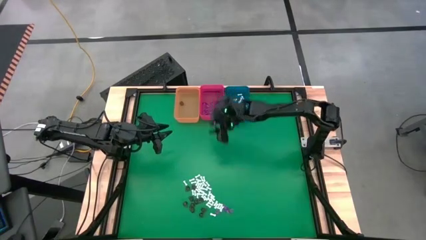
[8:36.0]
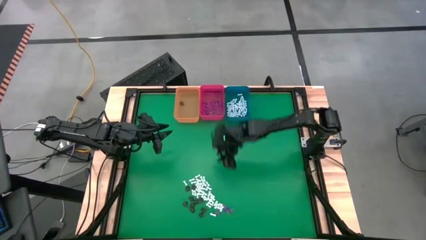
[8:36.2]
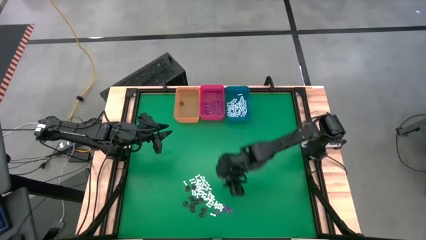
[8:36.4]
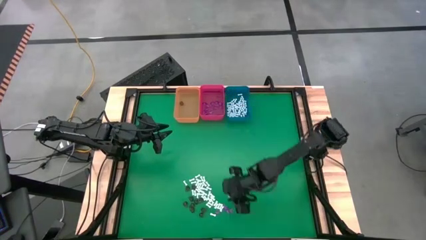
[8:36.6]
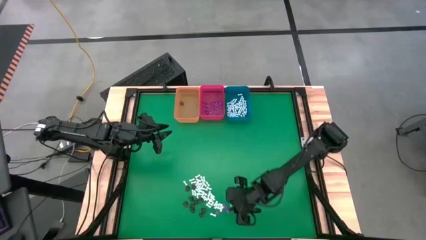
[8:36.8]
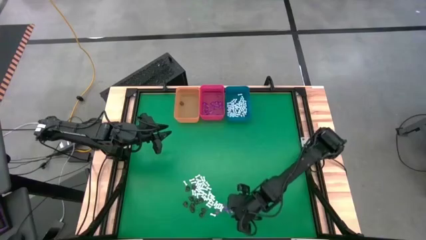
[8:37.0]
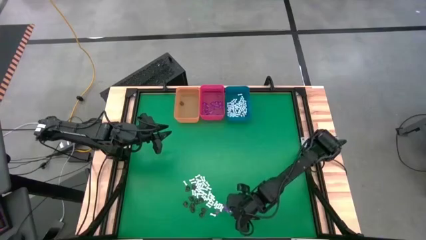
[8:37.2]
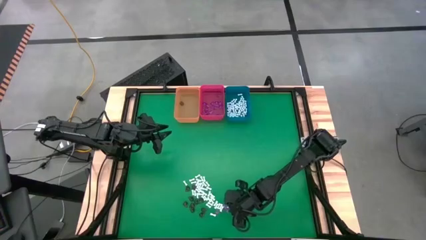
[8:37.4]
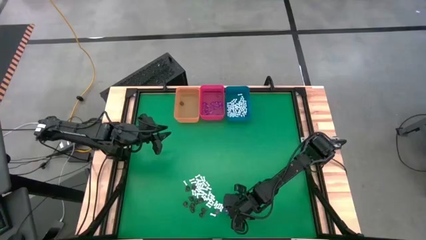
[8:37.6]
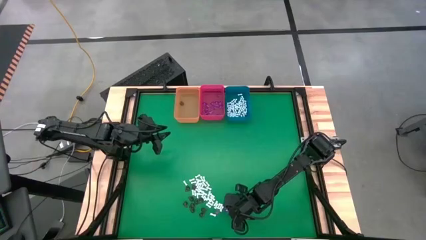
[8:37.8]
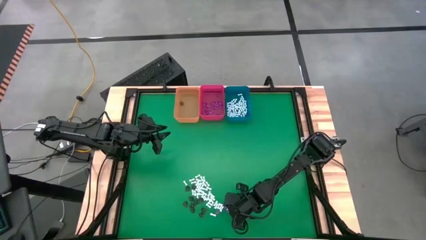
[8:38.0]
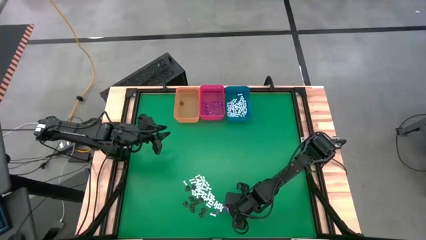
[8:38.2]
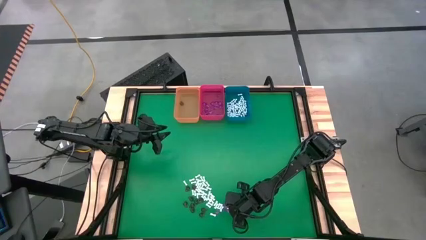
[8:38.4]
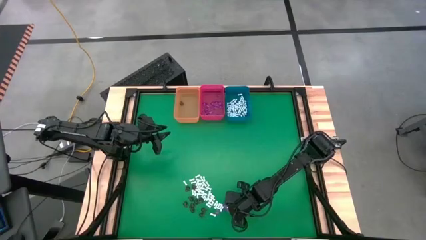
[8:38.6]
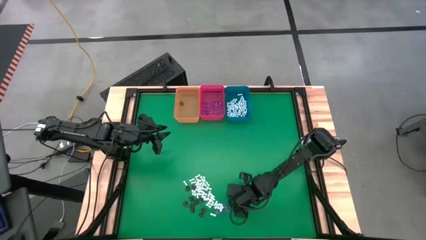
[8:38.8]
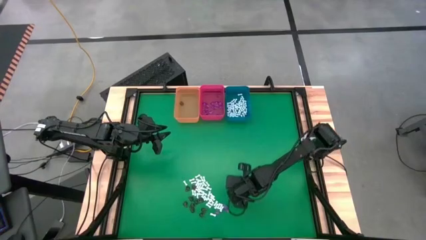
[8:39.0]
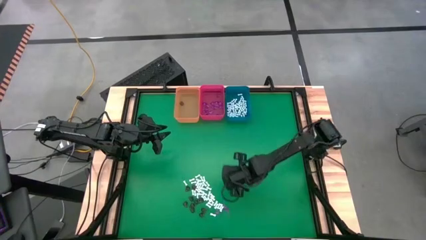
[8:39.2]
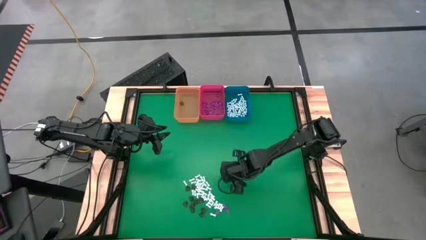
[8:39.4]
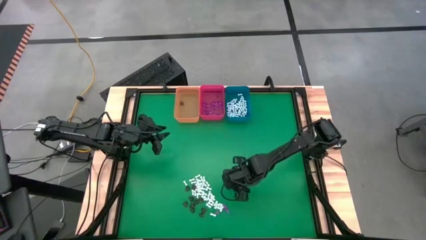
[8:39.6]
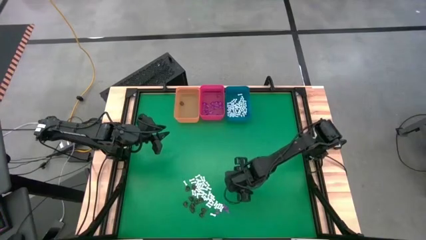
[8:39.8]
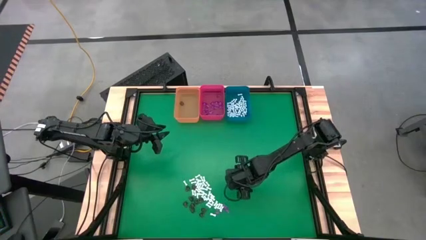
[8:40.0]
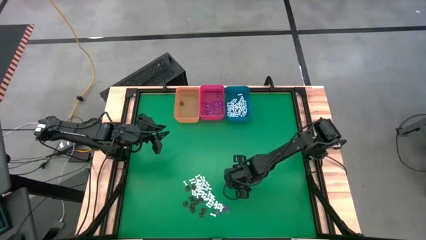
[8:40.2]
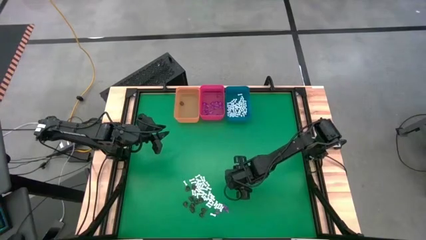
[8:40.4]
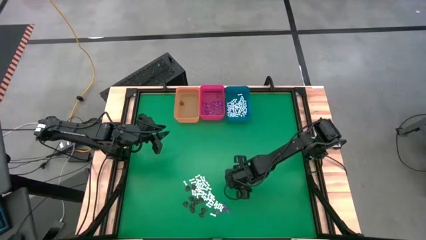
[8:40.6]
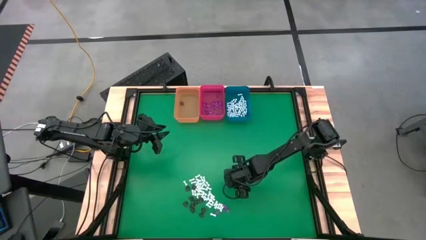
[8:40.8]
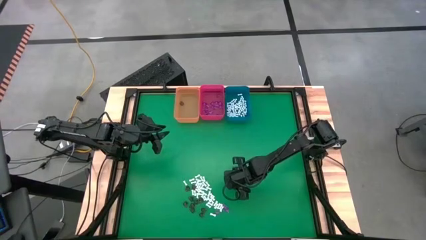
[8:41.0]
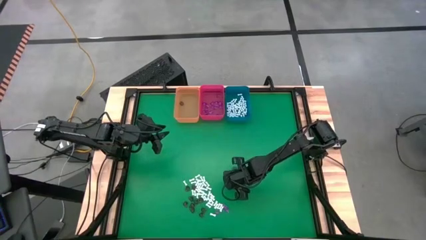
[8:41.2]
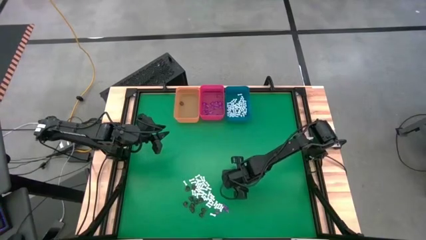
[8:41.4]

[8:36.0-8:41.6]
Task: Sort Halloween decoration
Put the violet witch hat toy into the red bin

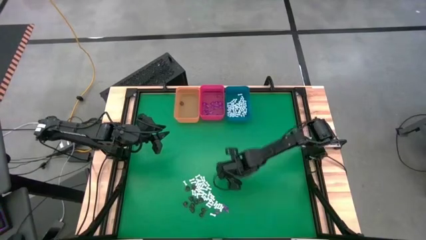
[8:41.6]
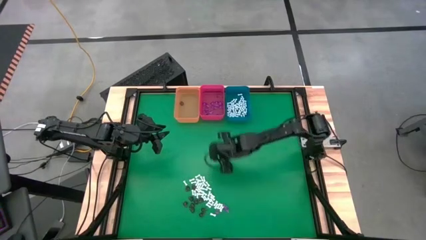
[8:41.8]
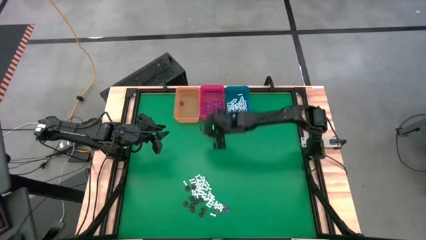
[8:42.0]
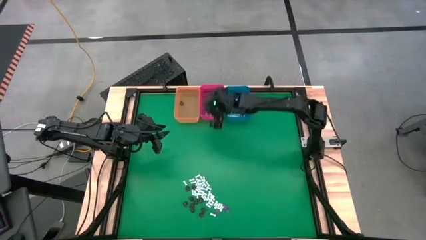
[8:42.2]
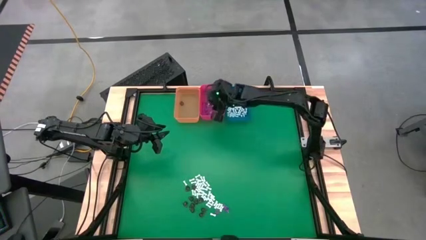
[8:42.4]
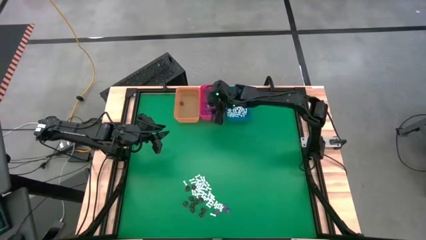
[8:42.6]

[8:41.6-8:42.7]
Put the violet witch hat toy into the red bin

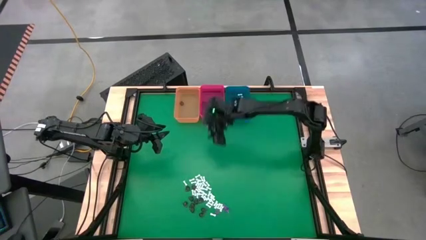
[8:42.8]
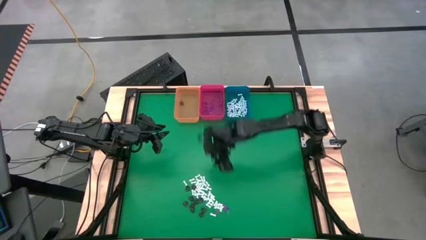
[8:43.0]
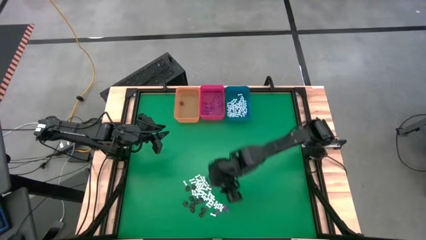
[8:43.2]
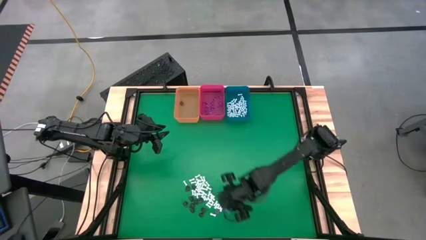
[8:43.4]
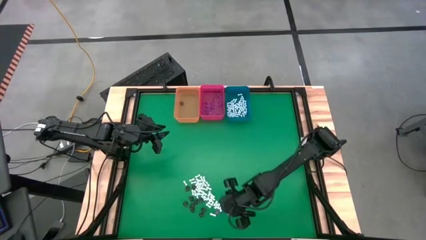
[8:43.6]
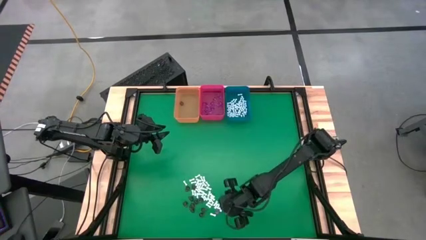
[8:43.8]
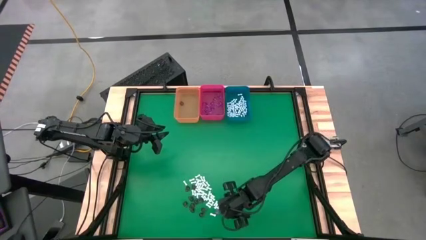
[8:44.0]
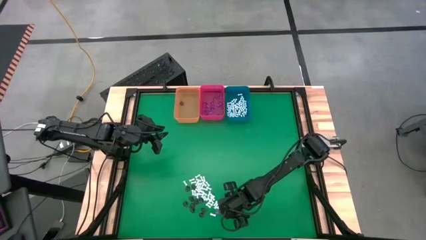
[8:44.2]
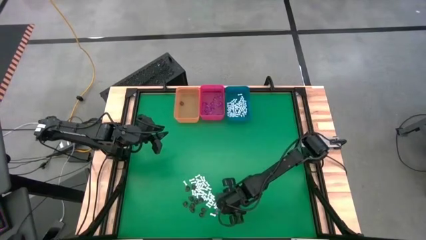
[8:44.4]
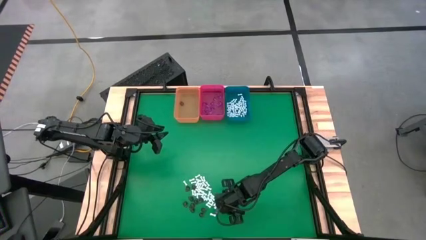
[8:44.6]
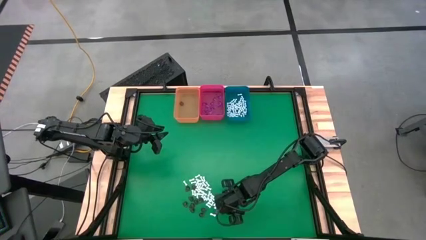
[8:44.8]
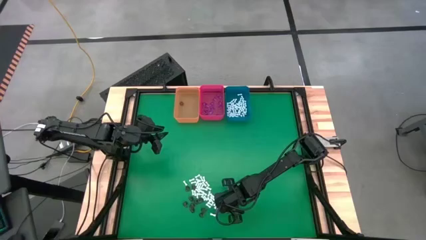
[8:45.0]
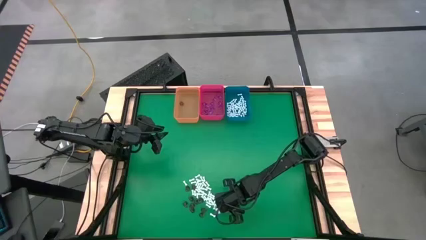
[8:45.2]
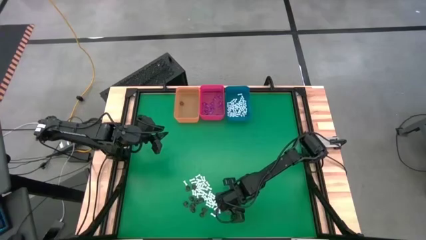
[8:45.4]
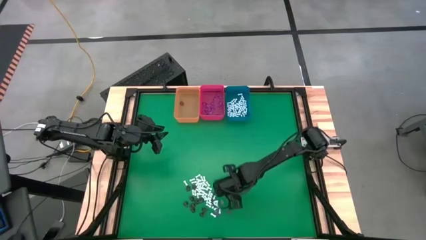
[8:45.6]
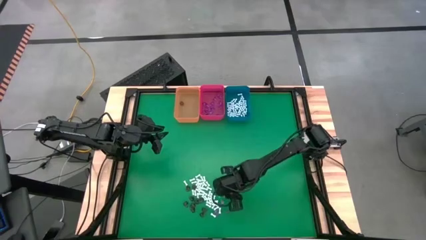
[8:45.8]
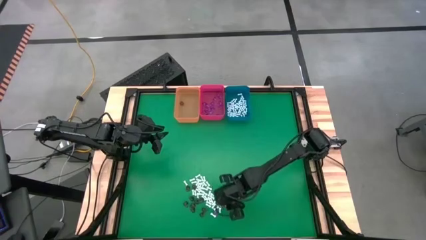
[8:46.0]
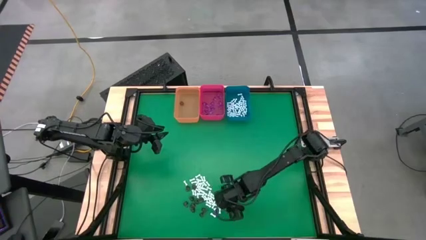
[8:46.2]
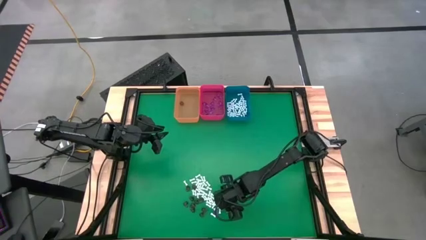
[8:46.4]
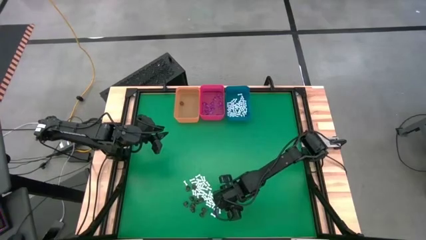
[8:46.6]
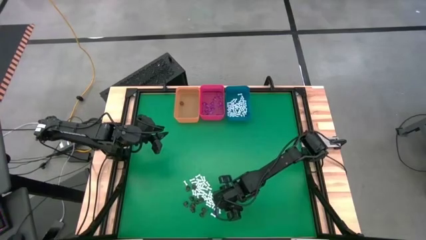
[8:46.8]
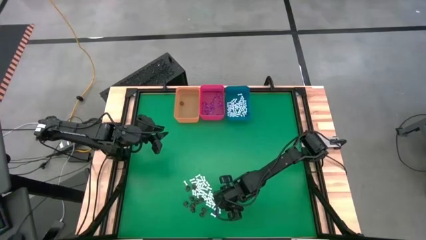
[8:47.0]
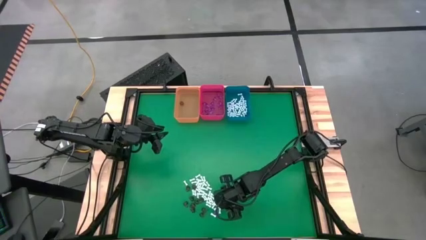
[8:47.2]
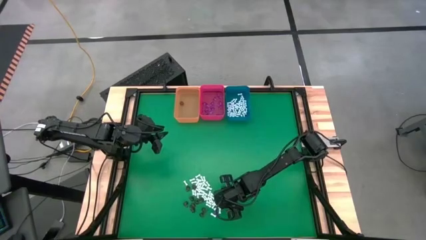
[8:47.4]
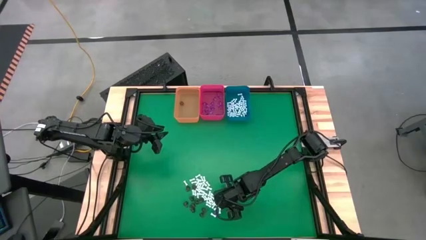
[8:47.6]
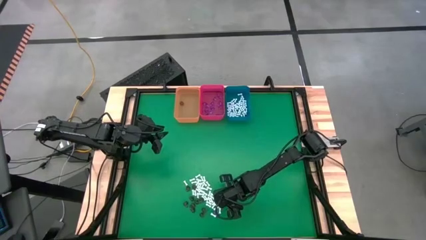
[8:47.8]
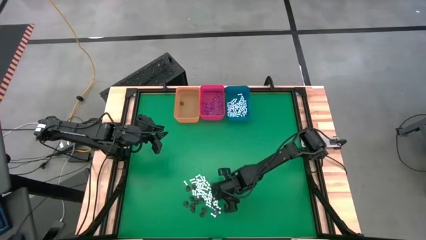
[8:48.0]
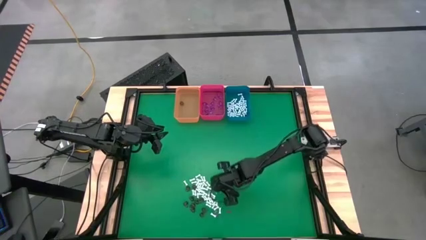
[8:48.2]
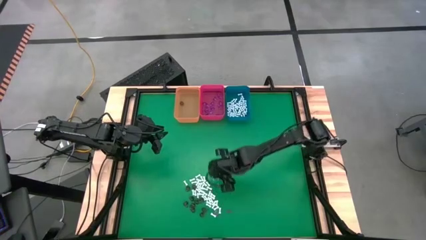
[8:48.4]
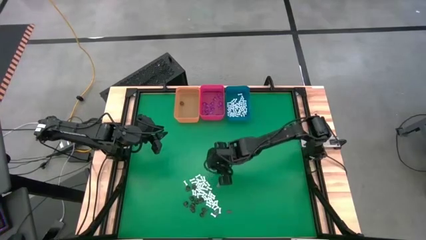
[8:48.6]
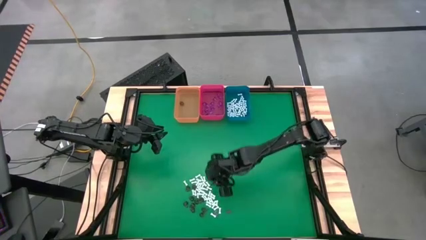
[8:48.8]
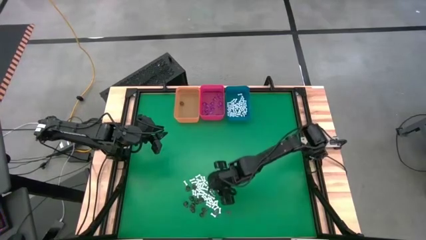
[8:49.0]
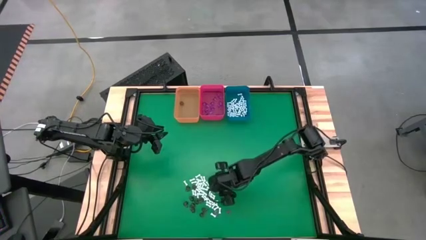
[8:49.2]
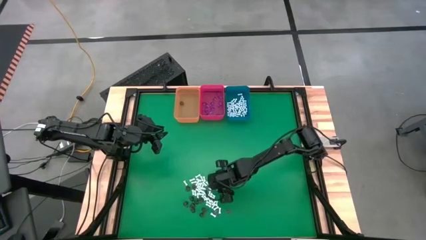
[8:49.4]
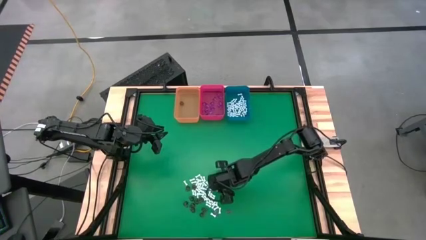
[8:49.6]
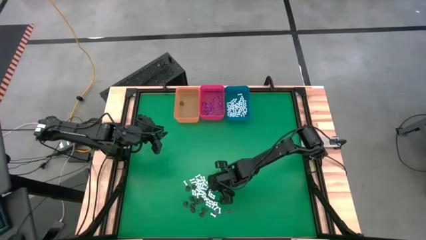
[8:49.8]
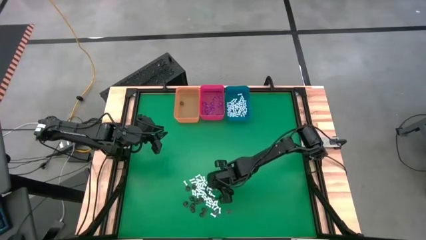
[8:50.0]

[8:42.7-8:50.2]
Put the violet witch hat toy into the red bin

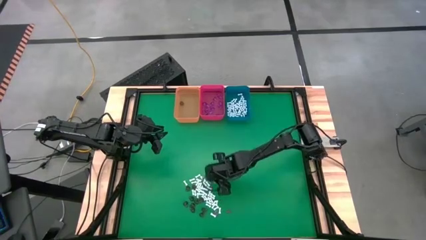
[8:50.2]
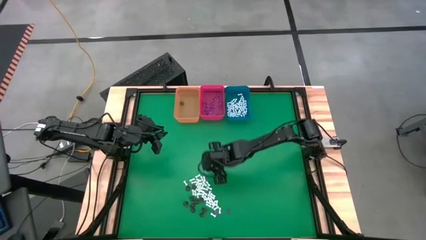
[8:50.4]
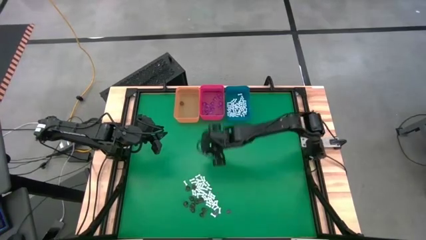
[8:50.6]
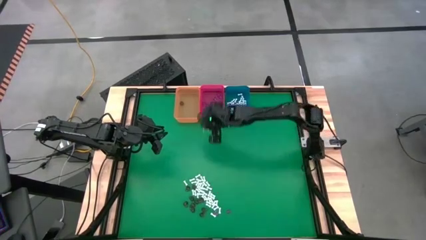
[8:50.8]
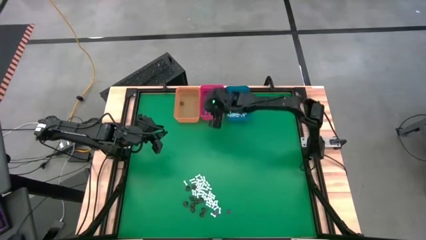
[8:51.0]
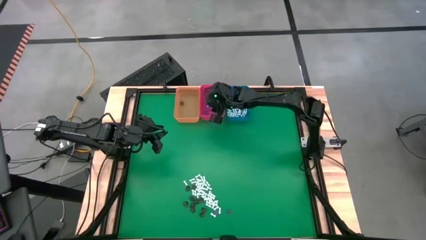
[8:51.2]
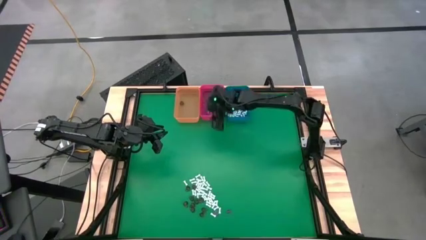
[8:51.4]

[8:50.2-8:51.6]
Put the violet witch hat toy into the red bin

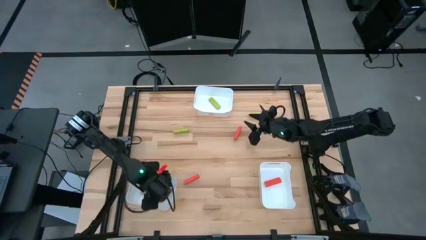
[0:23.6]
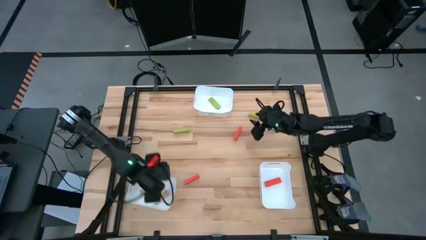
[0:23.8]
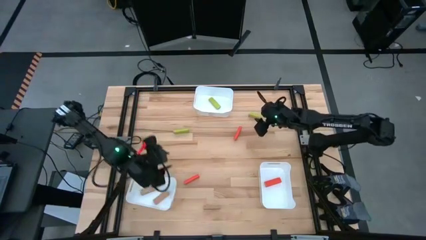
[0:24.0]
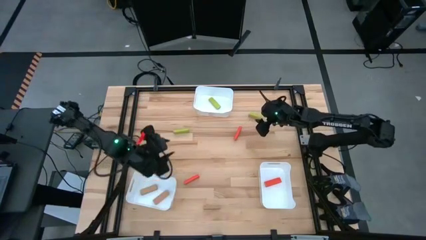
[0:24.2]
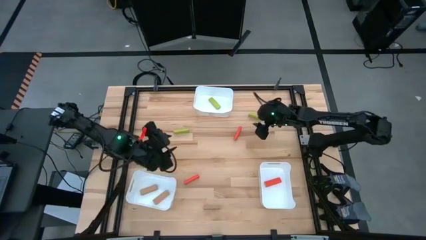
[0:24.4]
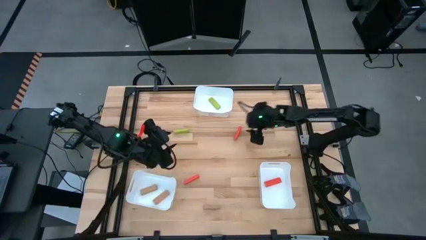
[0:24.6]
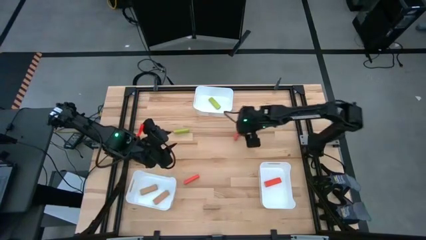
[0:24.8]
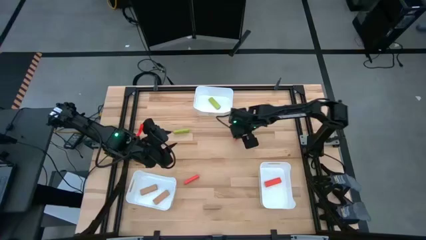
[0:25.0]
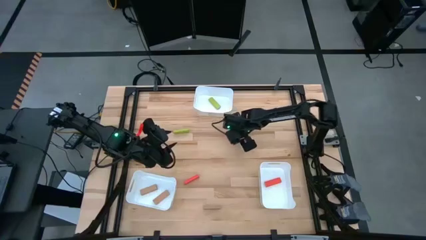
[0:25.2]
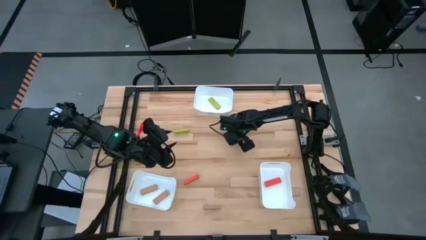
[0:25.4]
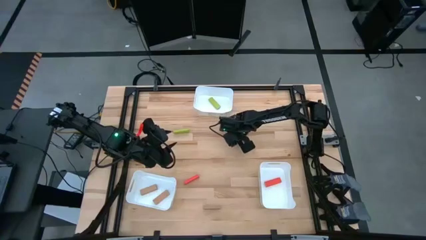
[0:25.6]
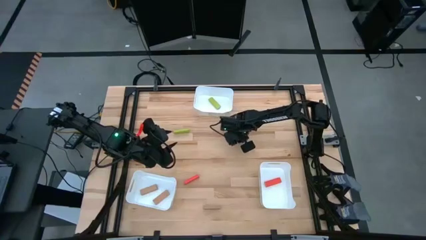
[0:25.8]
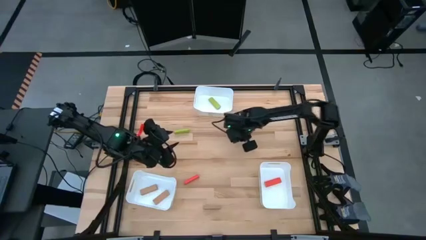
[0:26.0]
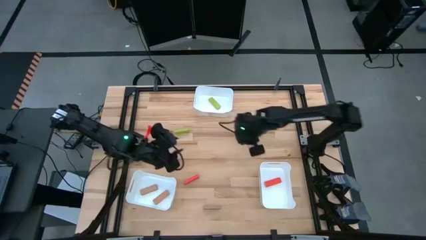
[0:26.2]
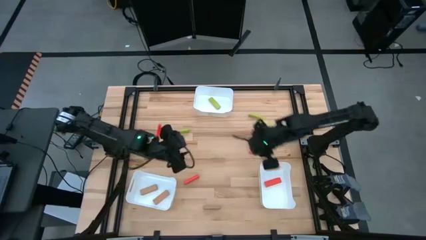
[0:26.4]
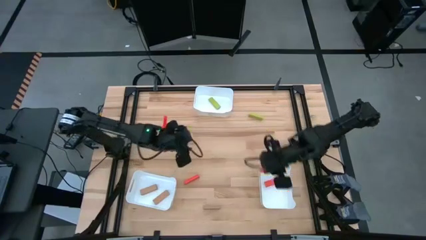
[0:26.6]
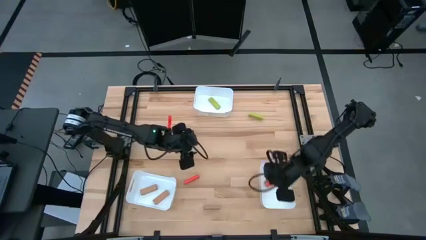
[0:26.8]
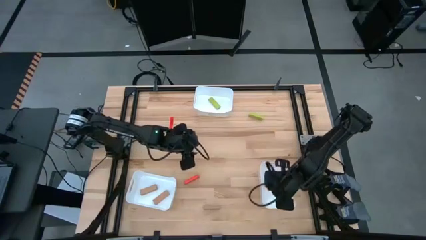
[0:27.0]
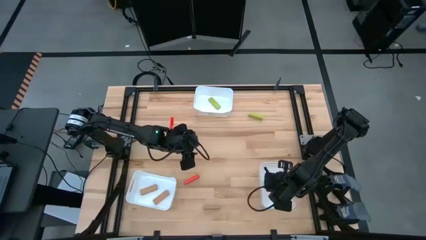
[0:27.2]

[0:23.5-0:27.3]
Task: Sort blocks
Put the top orange block into the bottom right white bin
